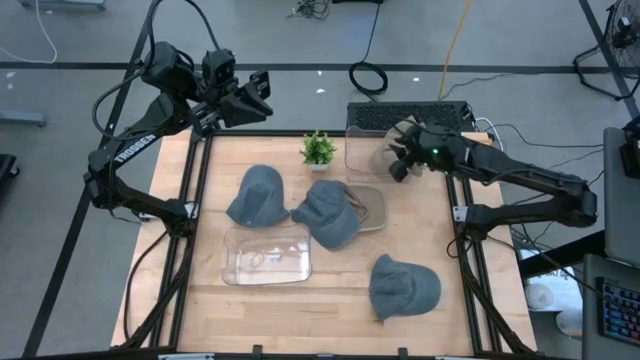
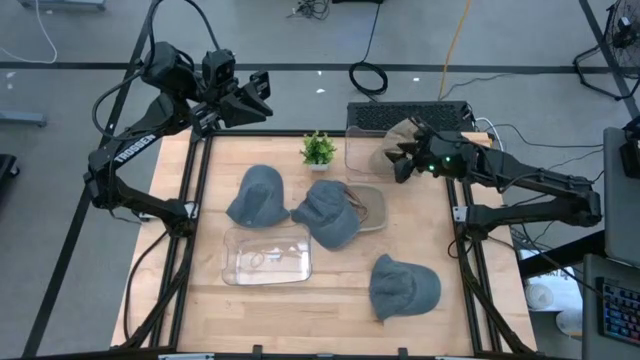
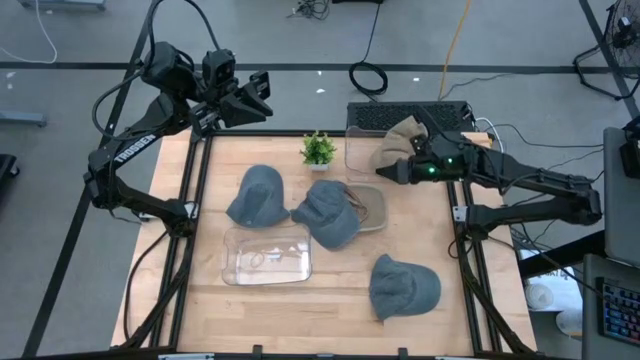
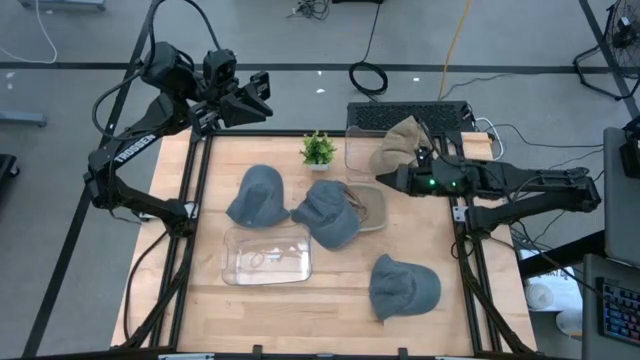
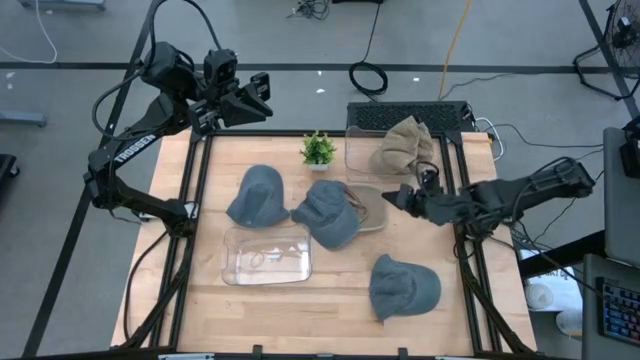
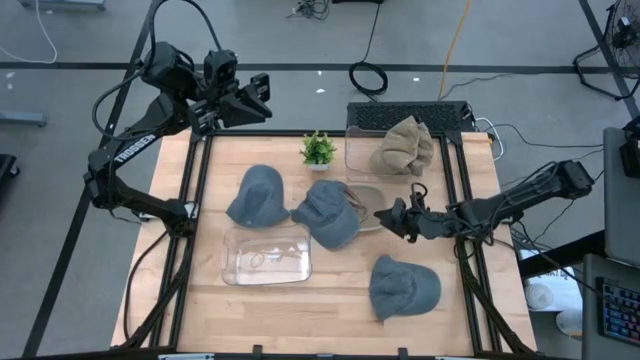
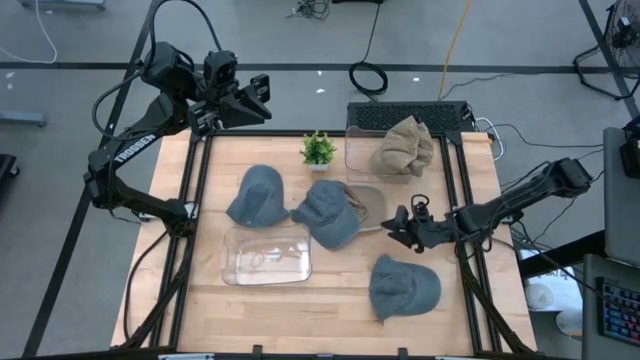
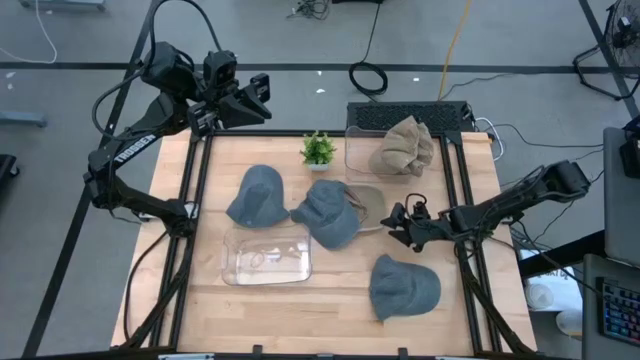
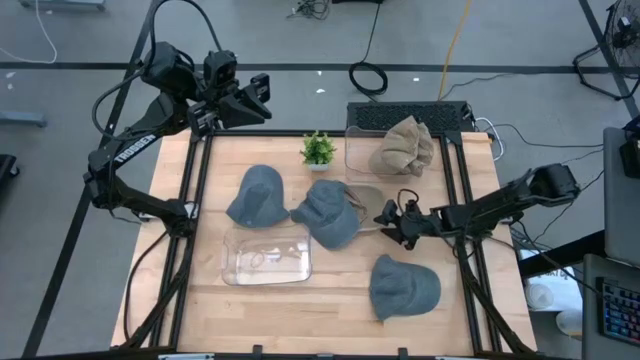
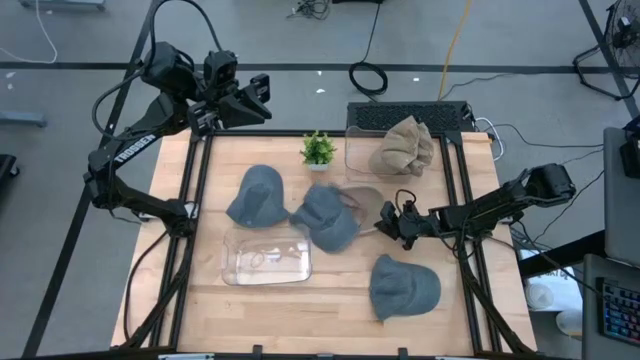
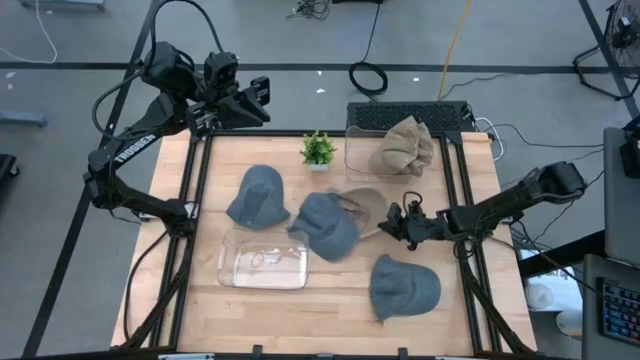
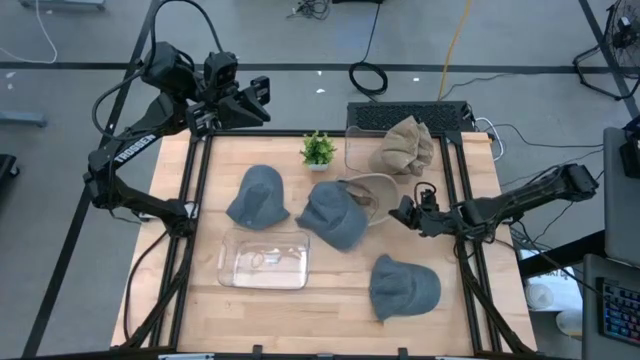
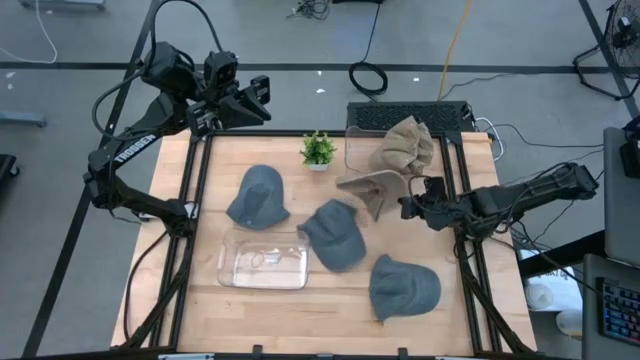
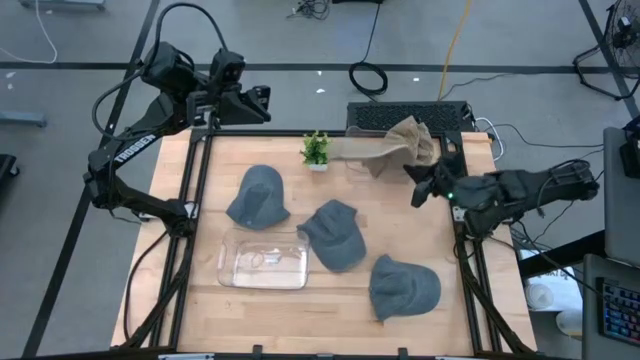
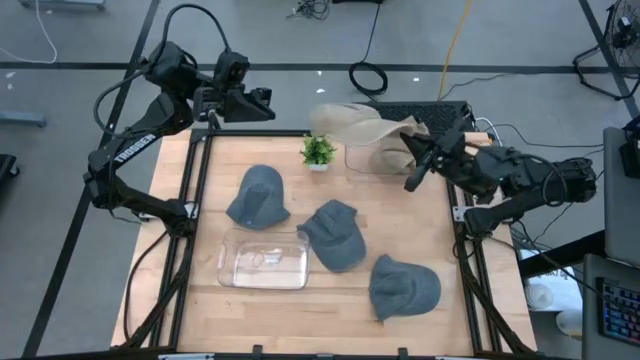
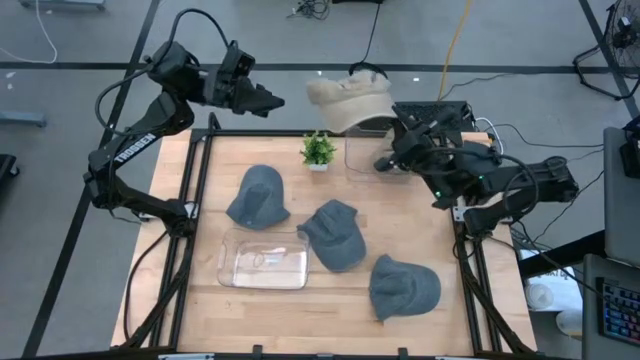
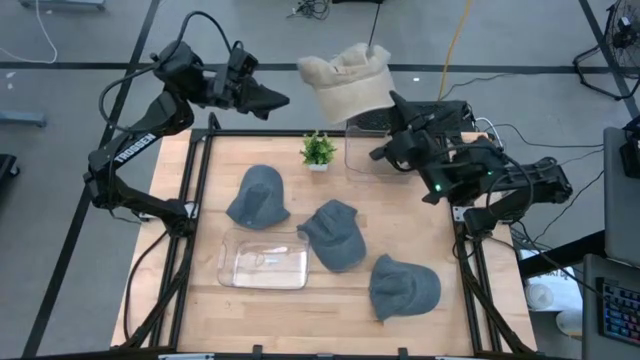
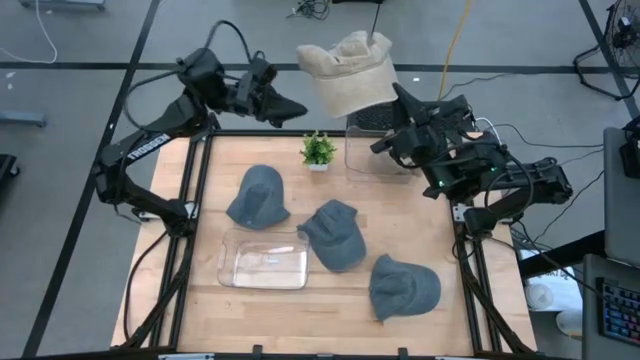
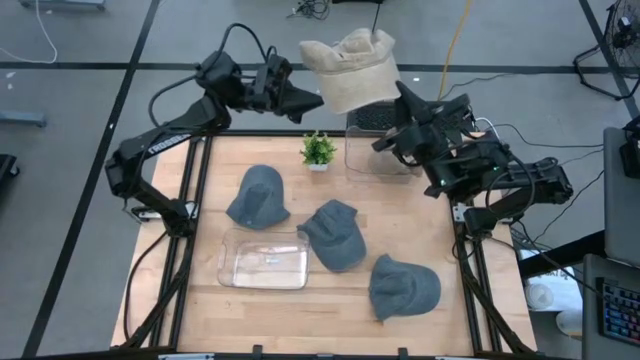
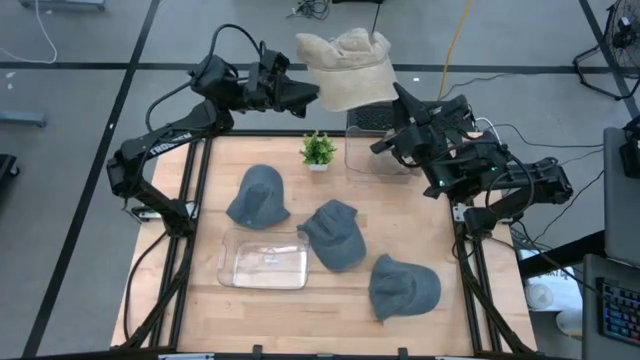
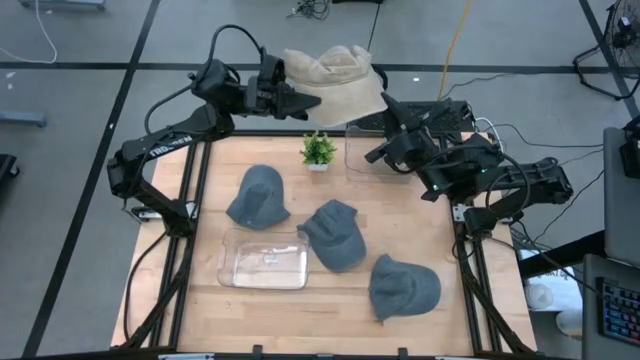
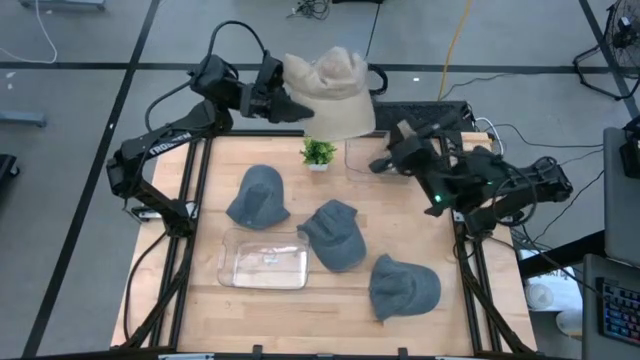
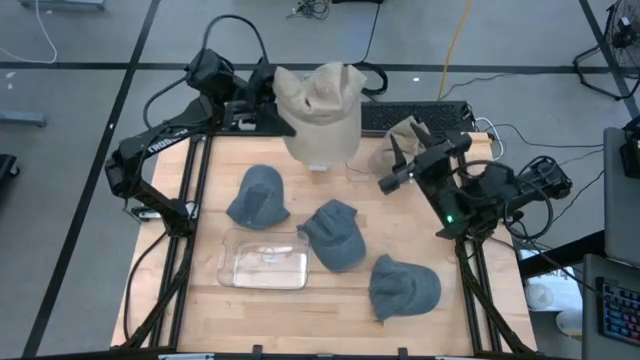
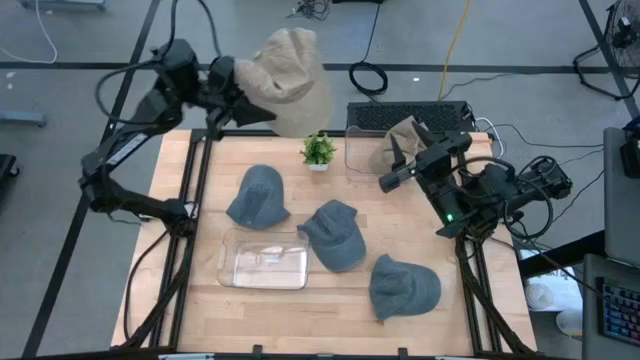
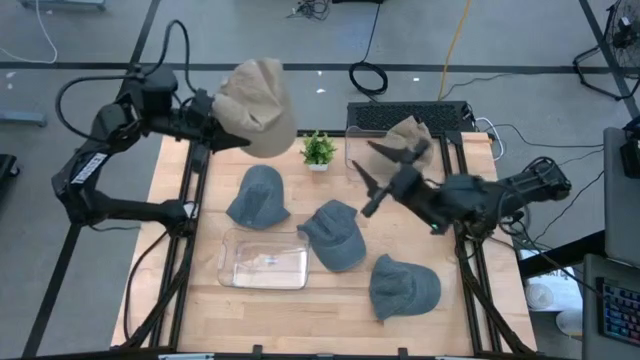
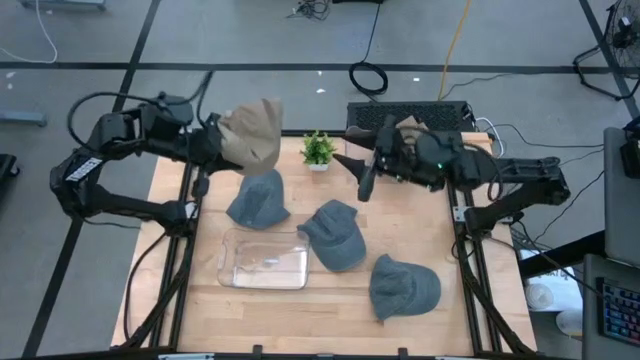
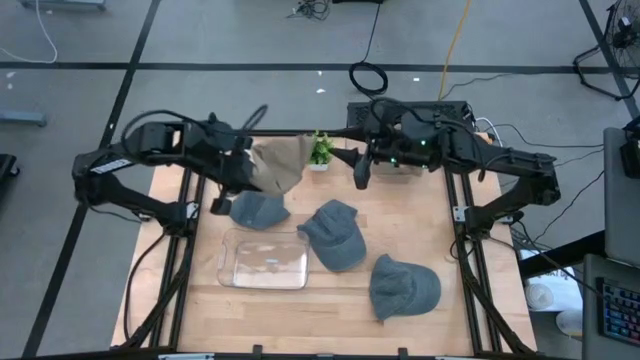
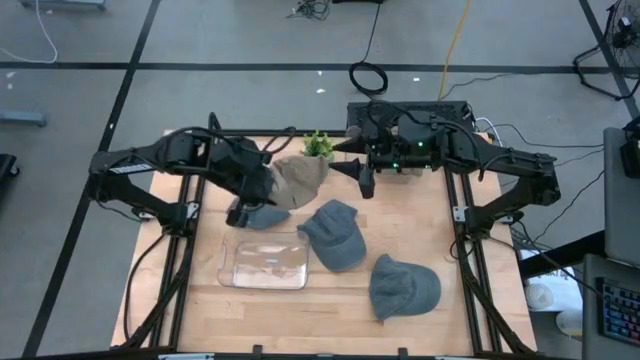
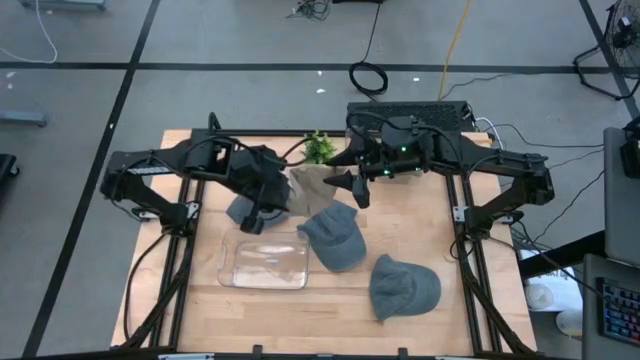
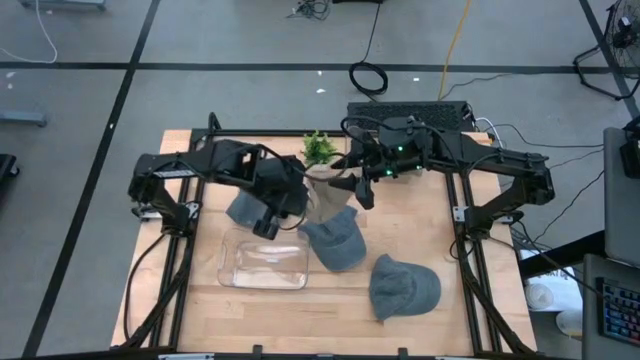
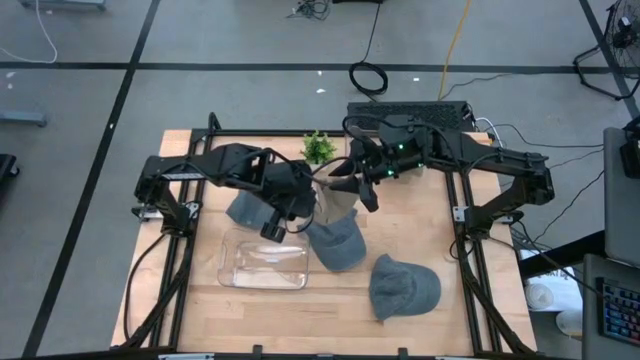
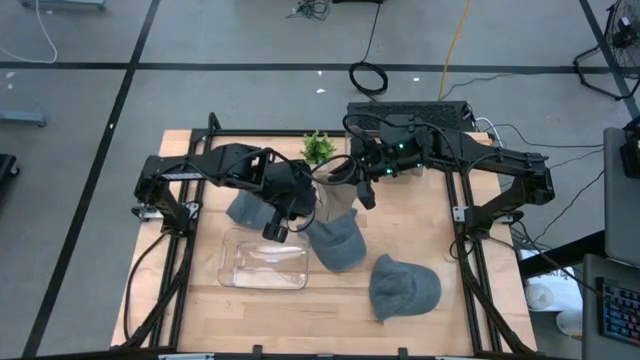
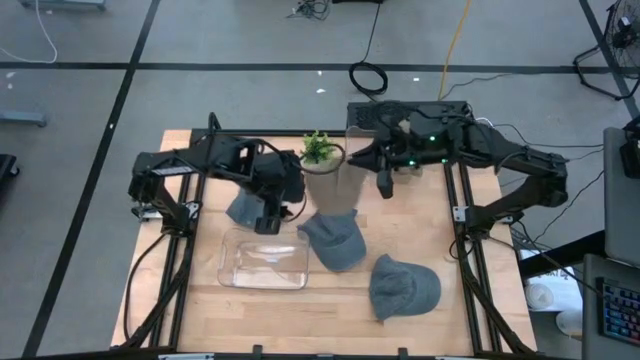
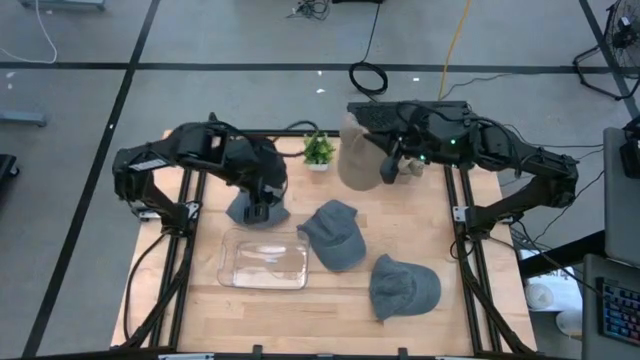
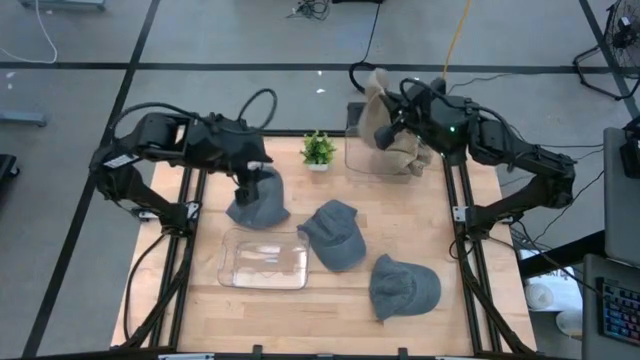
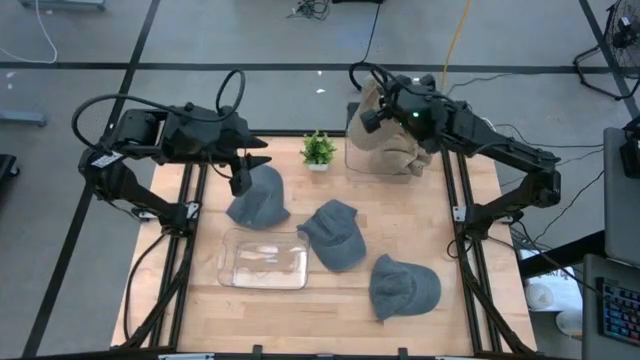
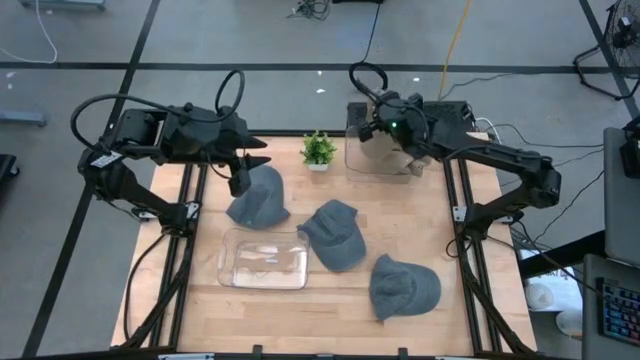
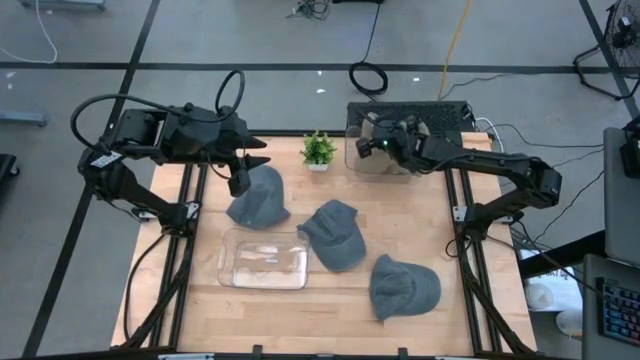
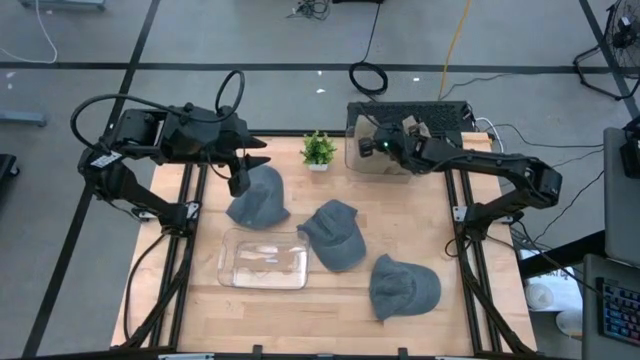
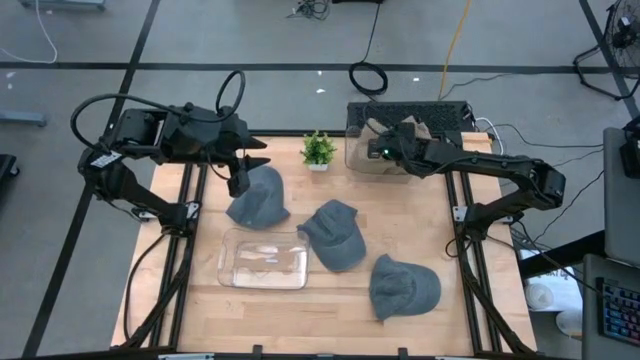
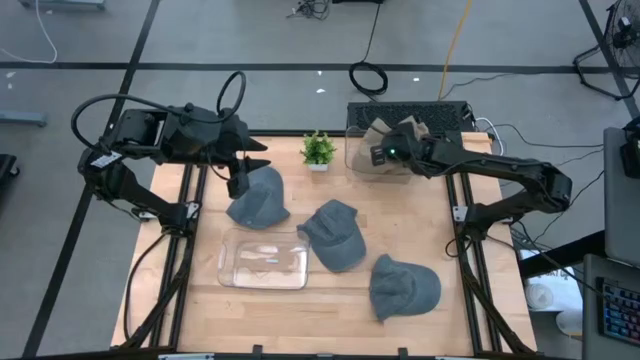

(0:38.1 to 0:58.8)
Task: Pick & Place hat
Put the brown cap into the top transparent bin

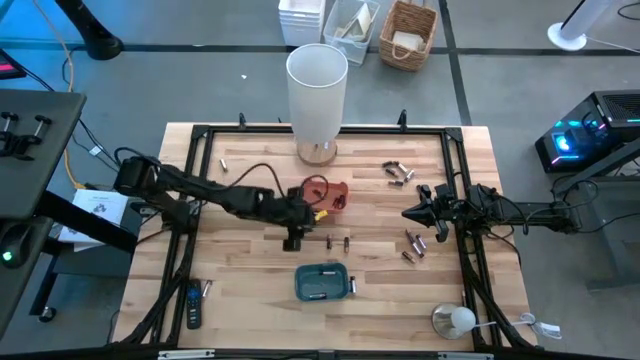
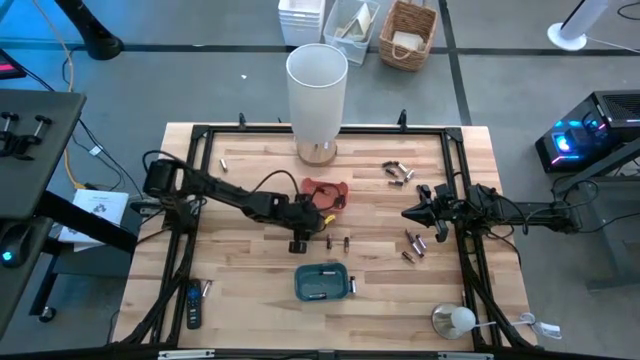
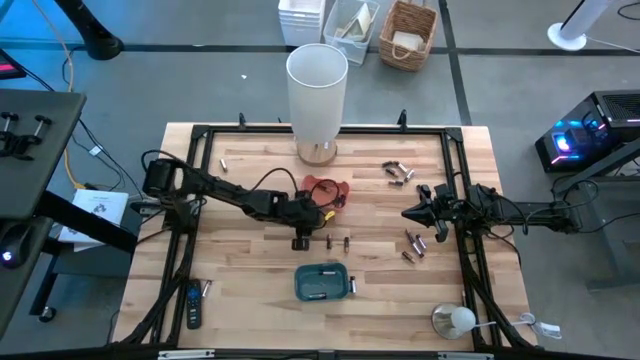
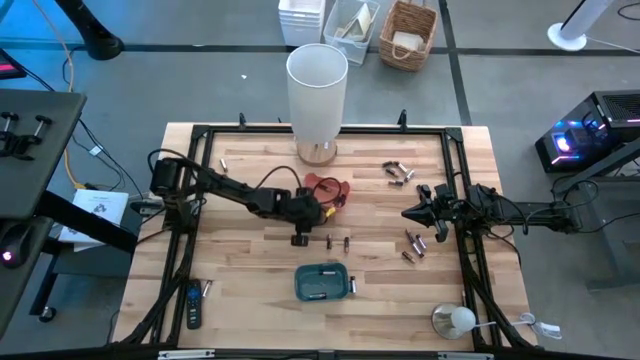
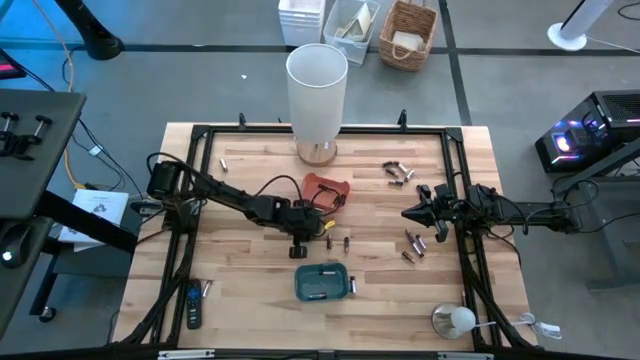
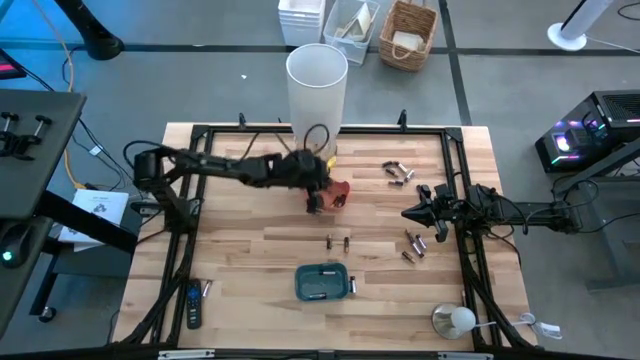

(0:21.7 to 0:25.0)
Task: Sort batteries
Put the black battery into the orange bin
